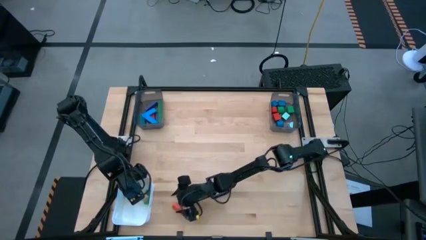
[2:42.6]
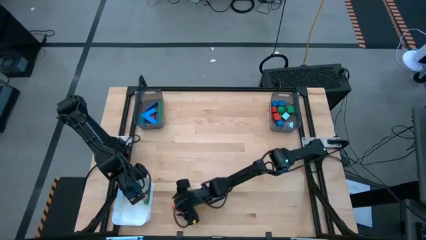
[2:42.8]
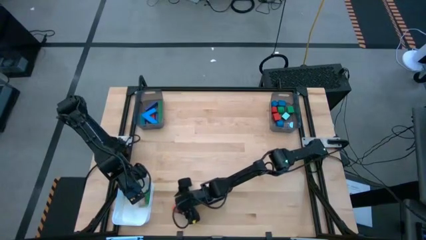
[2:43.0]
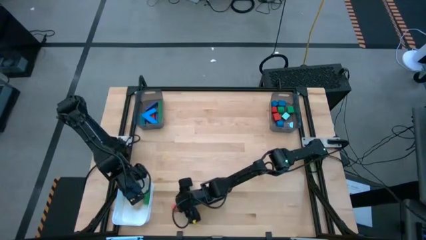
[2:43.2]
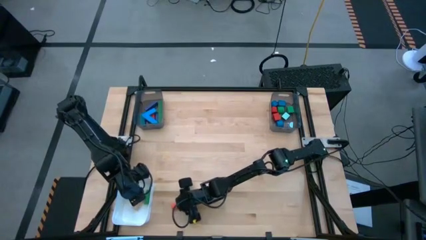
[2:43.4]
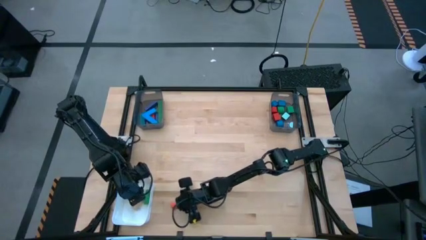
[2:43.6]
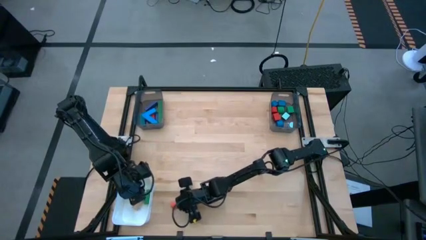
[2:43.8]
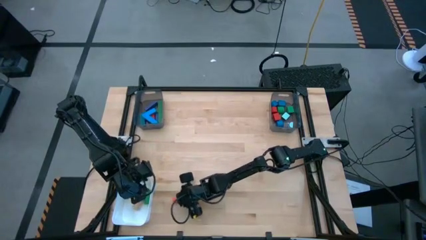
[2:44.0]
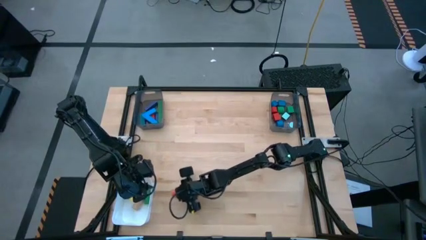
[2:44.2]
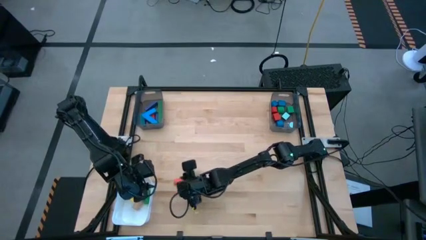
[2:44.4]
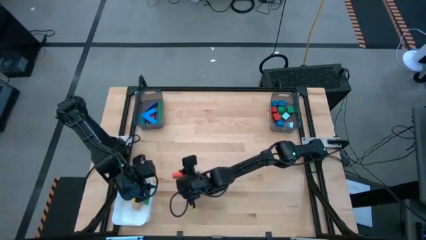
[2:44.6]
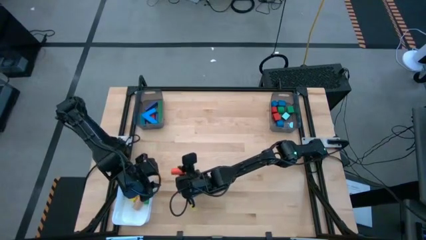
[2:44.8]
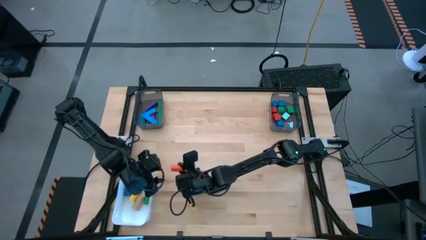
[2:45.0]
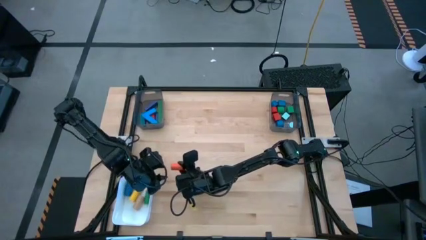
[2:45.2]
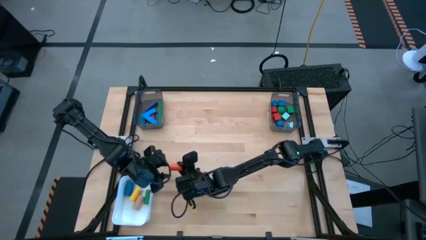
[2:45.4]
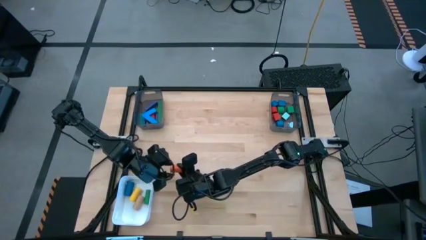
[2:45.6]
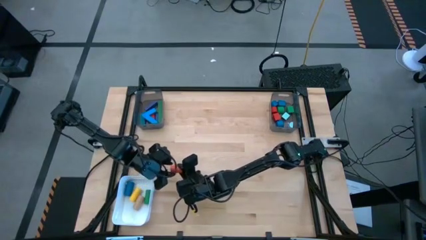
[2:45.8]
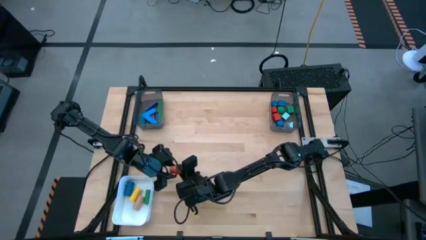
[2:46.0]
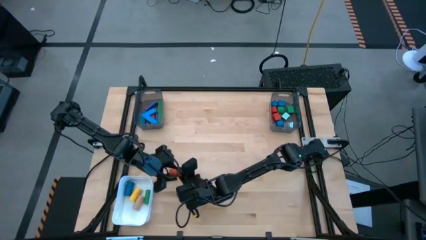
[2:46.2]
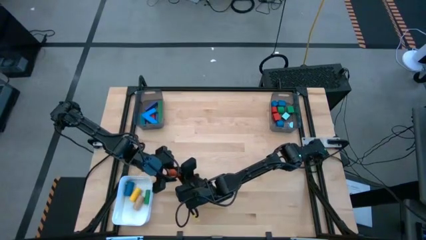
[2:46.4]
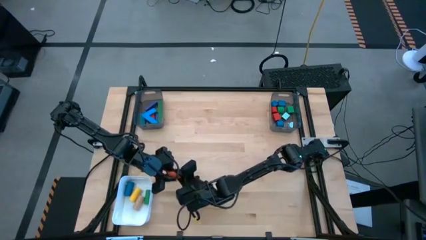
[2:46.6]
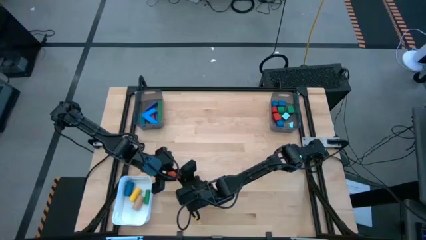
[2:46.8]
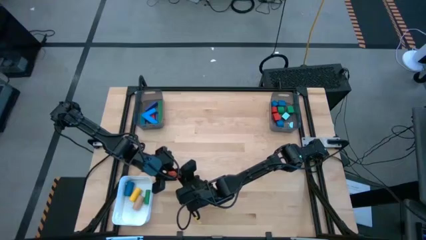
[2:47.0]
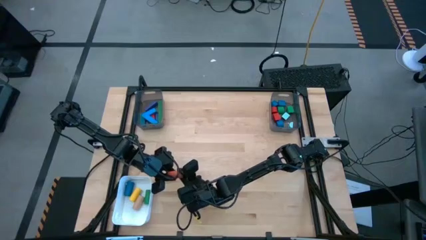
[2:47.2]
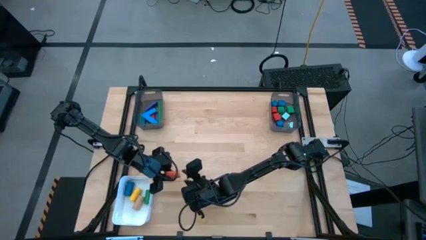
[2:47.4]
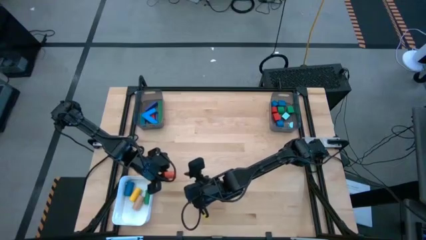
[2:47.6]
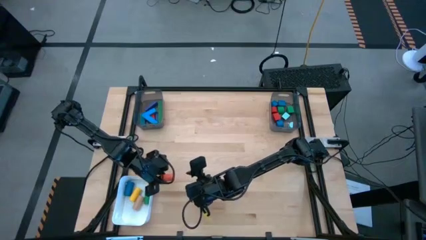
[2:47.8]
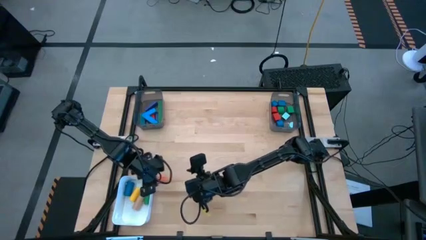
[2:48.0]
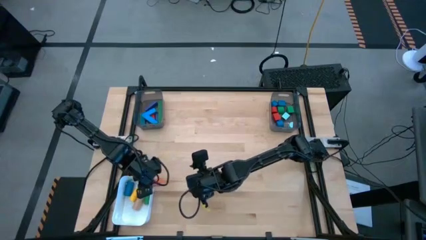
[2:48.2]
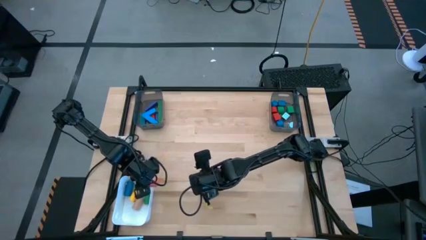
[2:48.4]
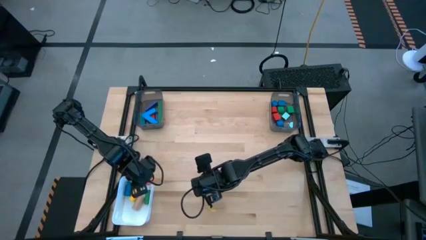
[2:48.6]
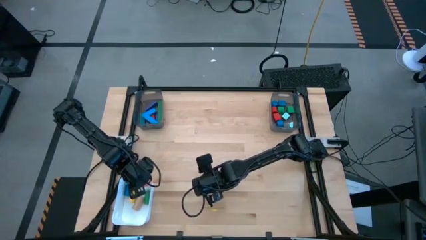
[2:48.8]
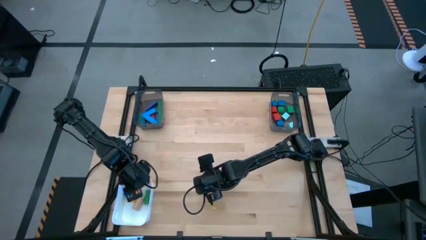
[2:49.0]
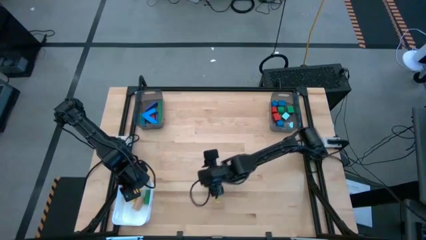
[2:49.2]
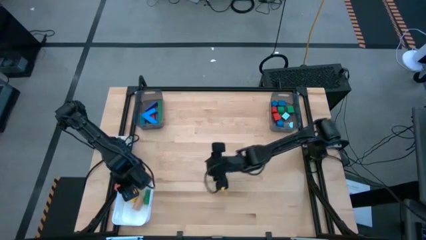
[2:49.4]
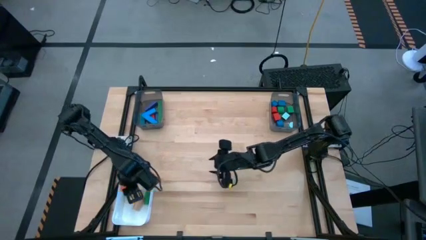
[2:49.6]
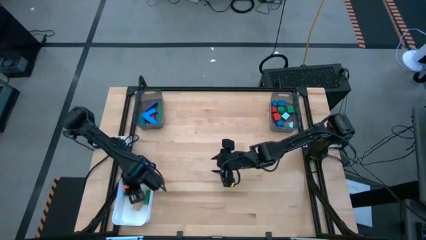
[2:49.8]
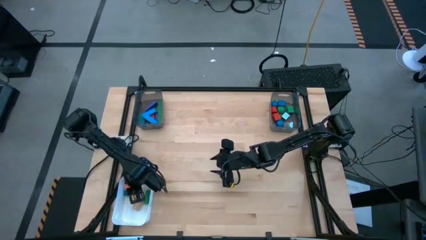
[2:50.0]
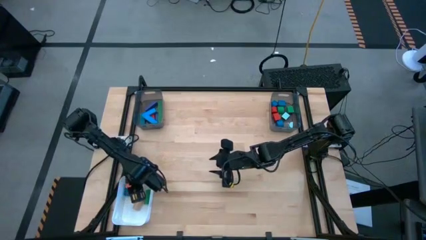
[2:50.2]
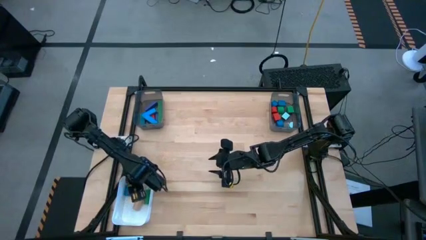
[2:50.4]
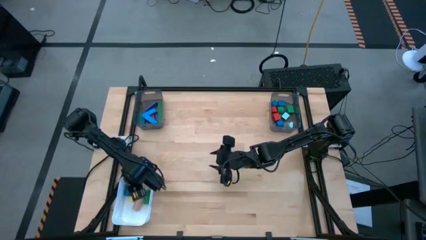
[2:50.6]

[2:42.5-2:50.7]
Task: Sort blocks by size
Put the orange cylindrical block into the white bin

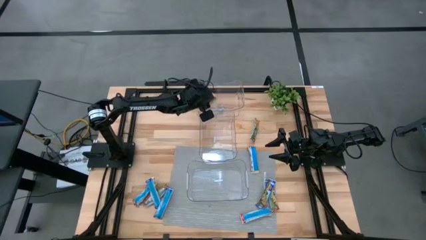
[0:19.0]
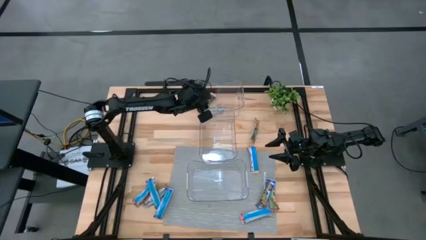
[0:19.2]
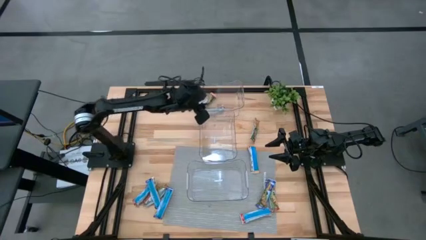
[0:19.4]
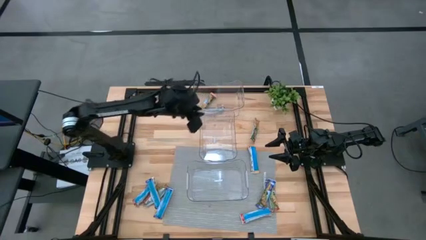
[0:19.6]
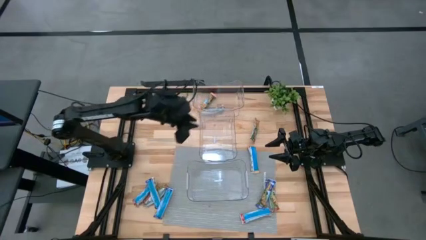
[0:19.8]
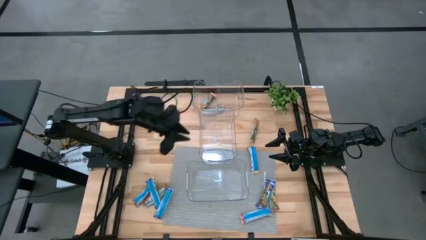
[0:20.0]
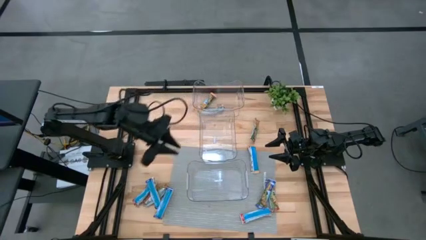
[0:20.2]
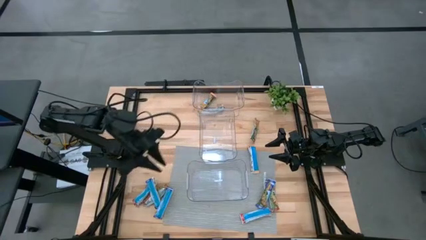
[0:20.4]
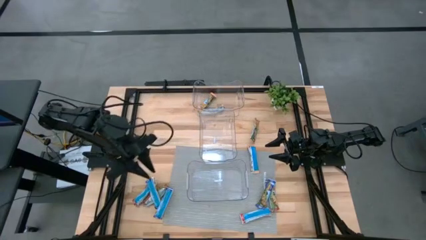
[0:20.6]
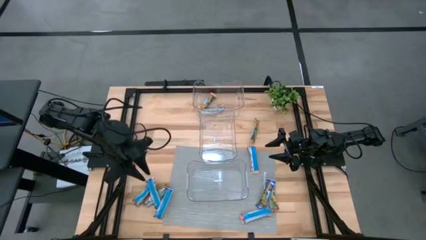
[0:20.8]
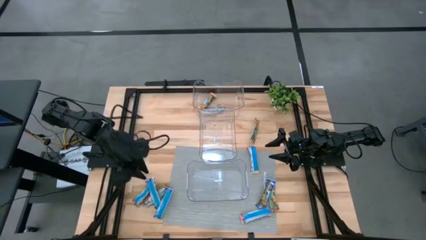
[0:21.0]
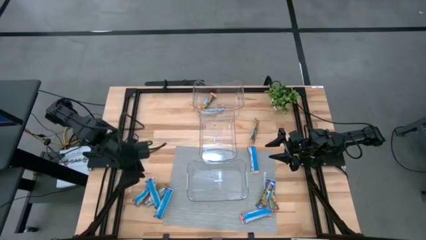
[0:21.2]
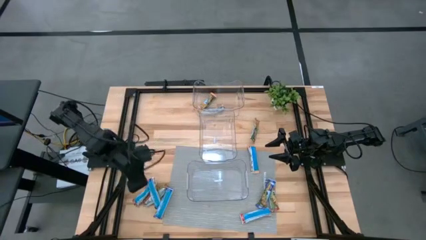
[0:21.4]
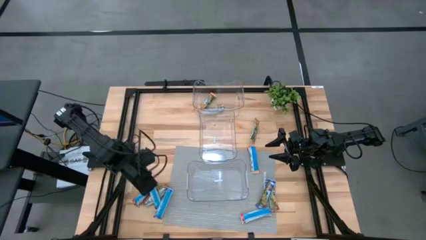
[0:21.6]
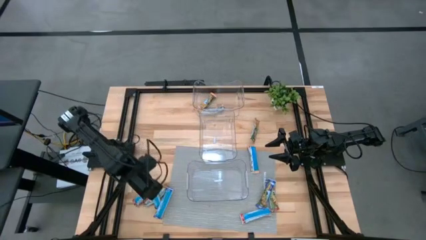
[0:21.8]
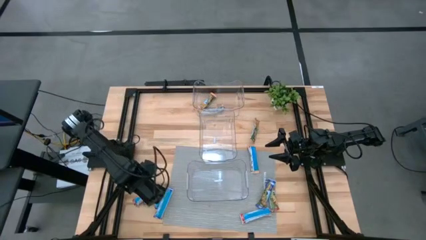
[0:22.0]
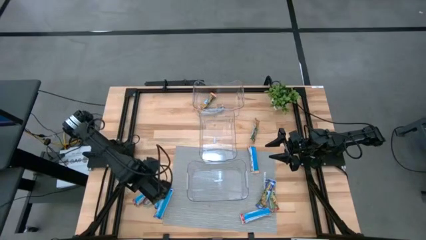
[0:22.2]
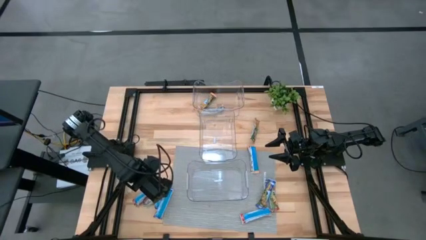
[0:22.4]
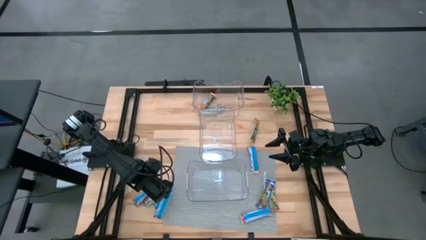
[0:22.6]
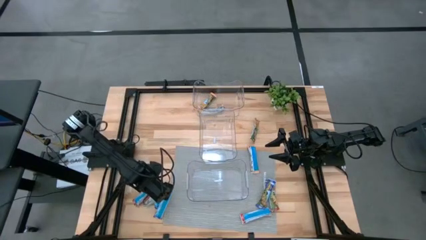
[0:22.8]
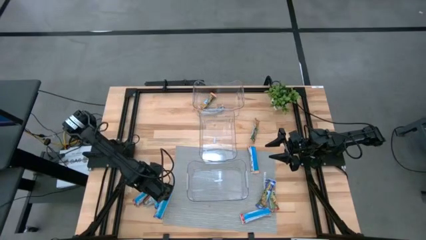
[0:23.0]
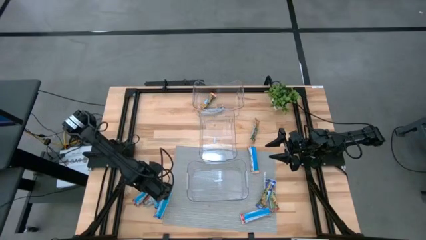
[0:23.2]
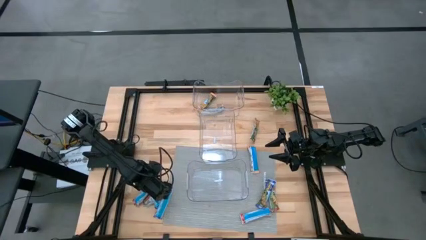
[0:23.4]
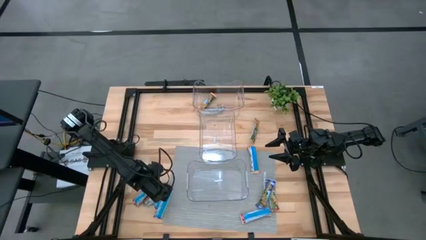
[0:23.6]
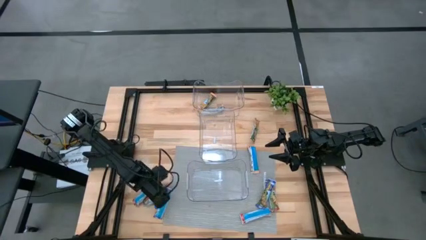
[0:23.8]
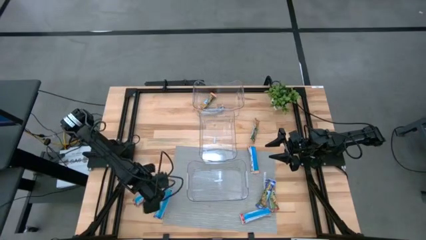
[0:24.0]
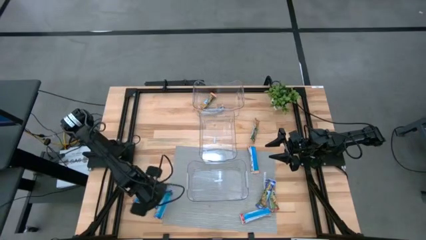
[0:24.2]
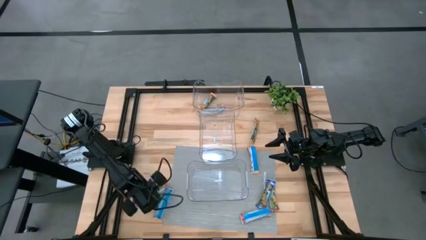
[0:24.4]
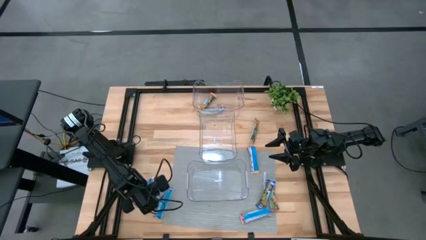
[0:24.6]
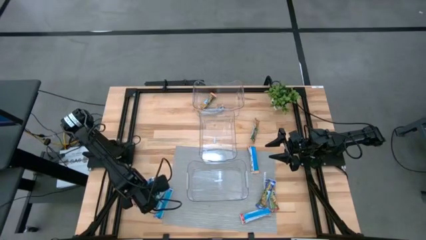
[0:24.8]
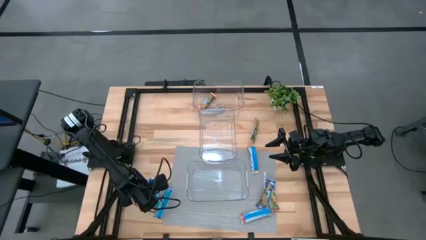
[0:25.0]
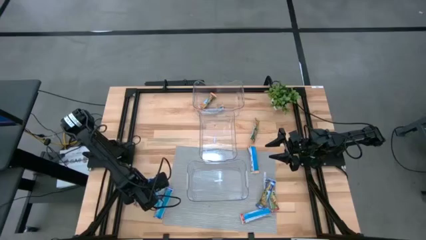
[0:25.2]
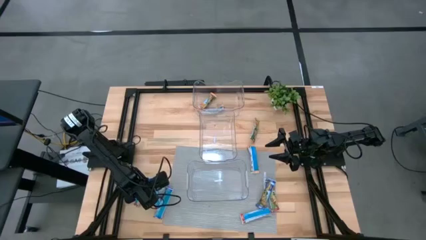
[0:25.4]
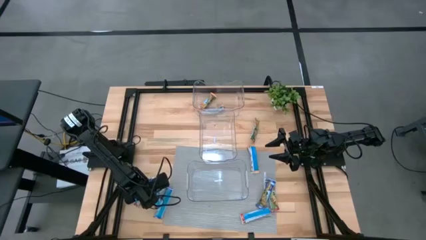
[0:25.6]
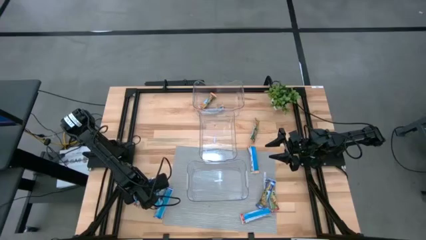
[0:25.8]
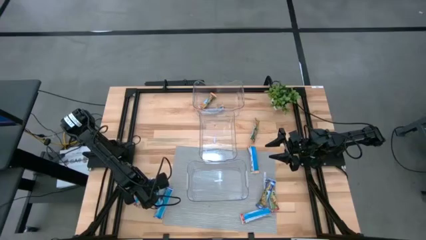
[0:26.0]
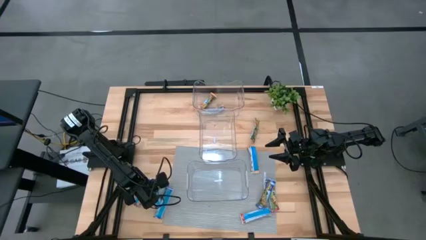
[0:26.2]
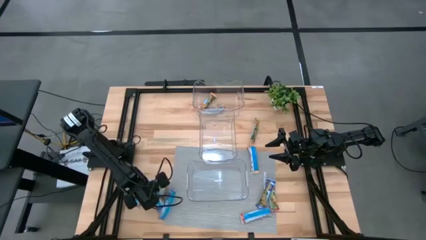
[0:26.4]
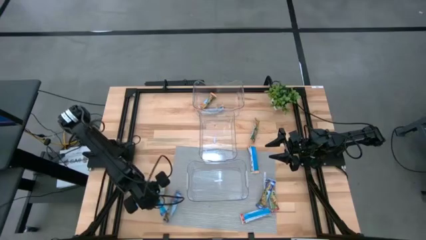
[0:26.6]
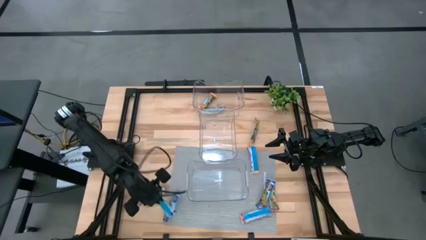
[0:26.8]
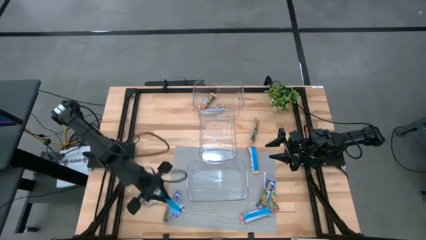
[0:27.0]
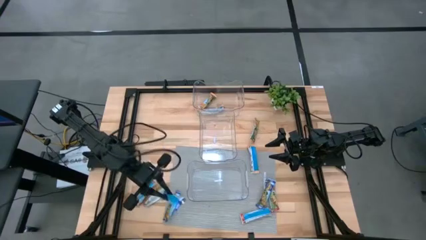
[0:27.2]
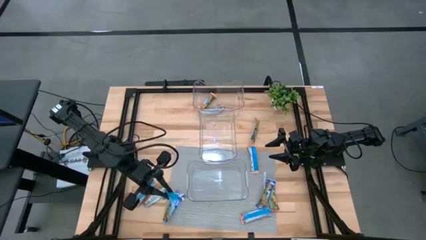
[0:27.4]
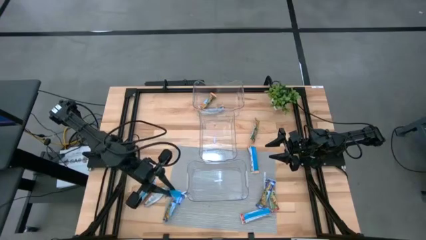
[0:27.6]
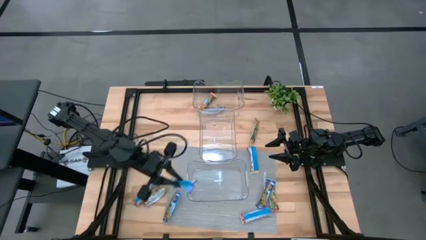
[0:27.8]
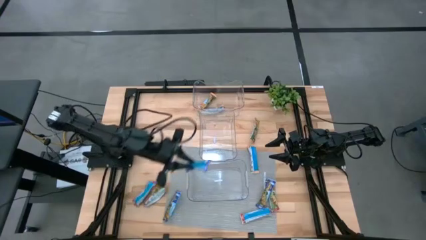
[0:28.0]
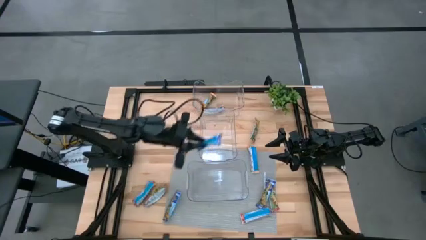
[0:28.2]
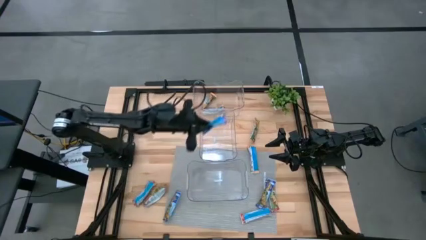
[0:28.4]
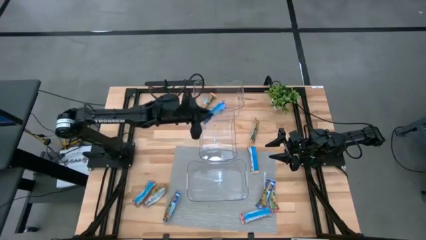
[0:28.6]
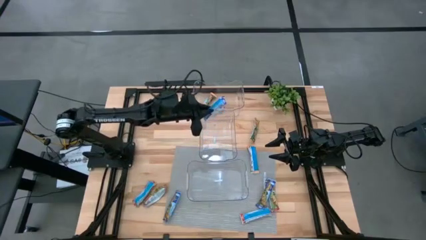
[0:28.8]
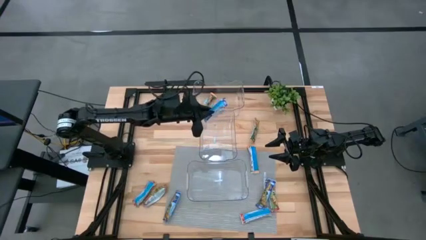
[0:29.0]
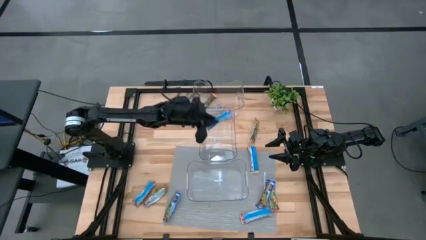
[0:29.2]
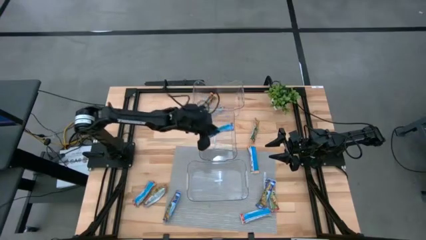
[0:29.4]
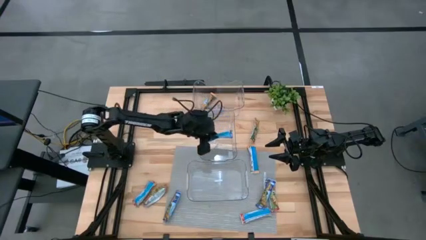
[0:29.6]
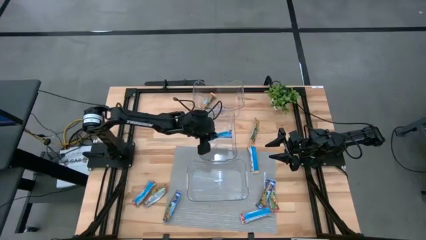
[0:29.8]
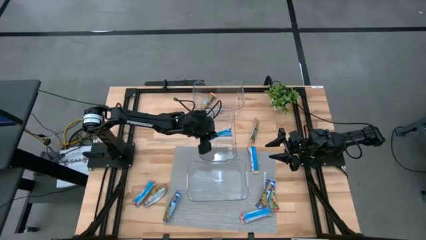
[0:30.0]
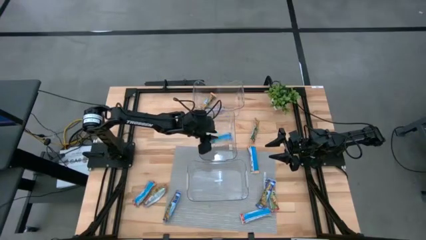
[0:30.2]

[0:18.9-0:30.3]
Task: Pick and place Granola Bars by type
Put the blue granola bar into the middle transparent bin
